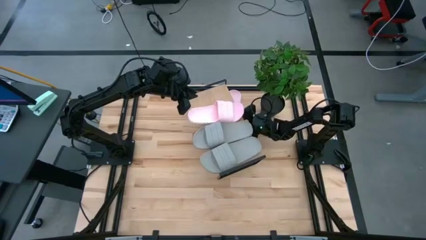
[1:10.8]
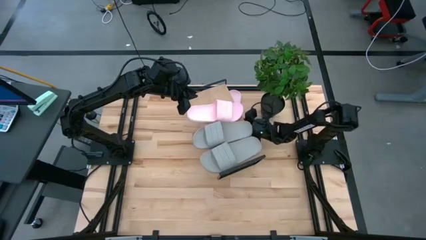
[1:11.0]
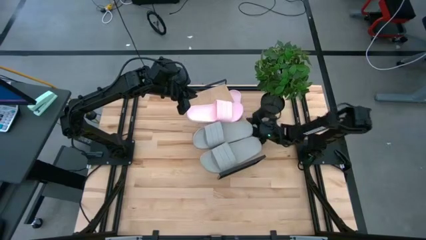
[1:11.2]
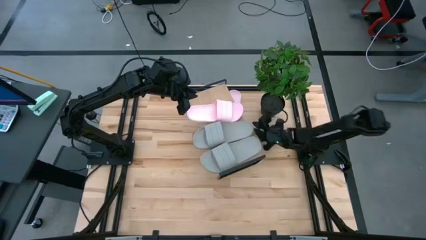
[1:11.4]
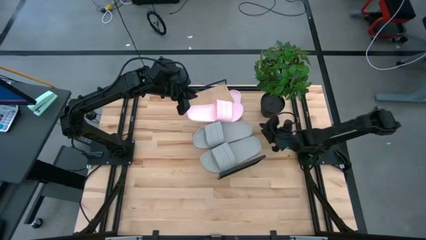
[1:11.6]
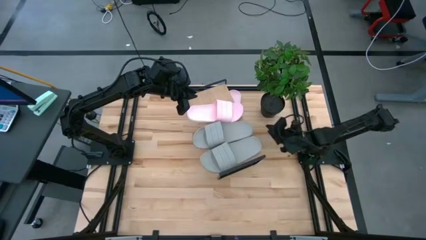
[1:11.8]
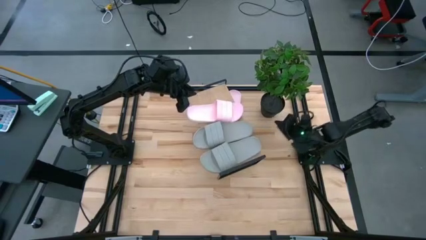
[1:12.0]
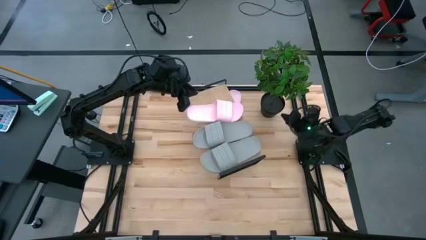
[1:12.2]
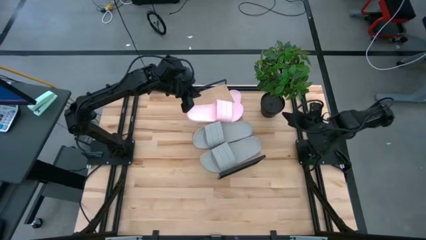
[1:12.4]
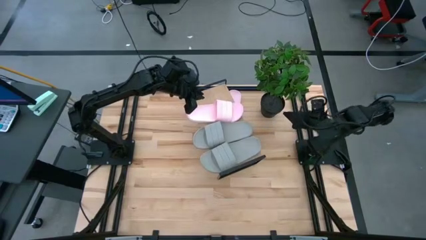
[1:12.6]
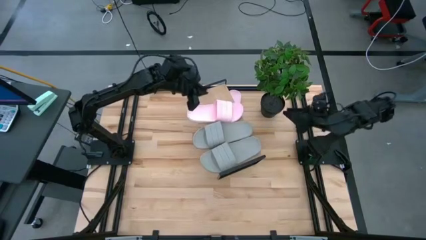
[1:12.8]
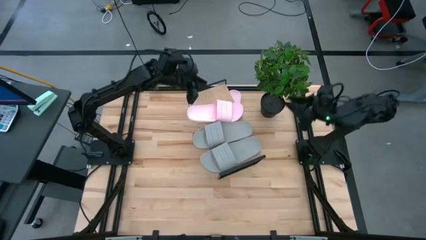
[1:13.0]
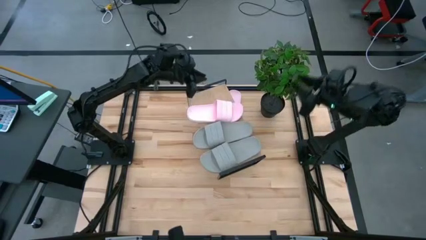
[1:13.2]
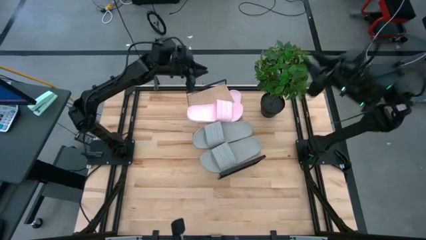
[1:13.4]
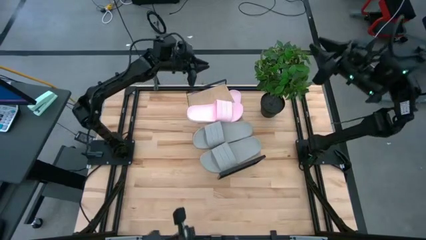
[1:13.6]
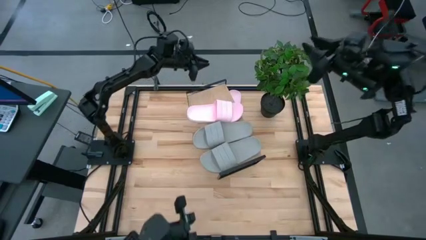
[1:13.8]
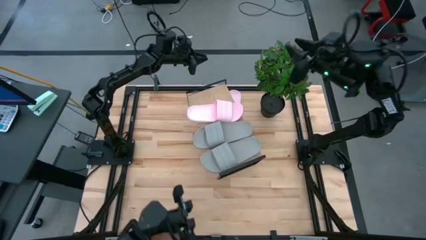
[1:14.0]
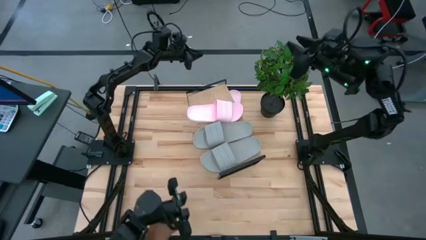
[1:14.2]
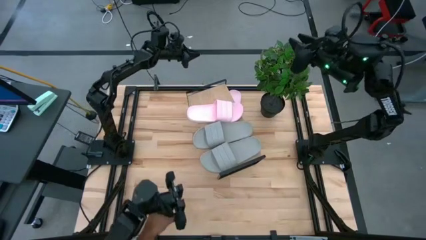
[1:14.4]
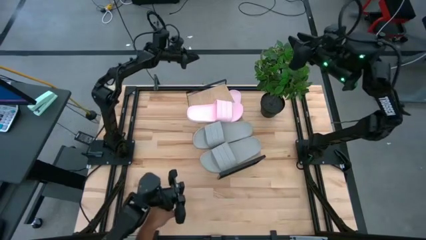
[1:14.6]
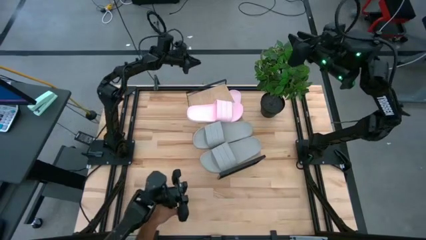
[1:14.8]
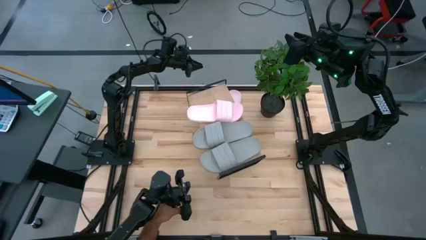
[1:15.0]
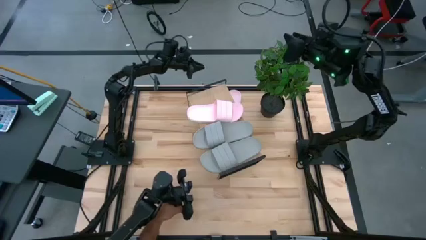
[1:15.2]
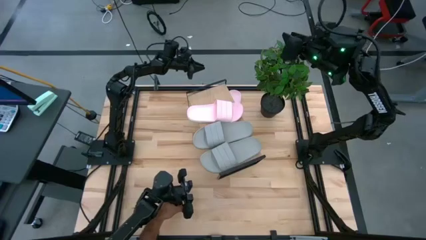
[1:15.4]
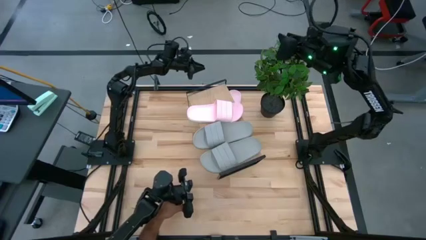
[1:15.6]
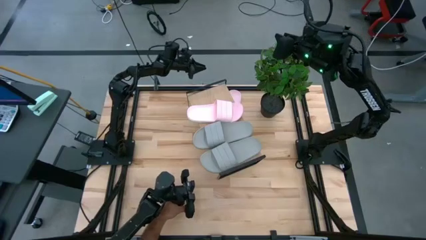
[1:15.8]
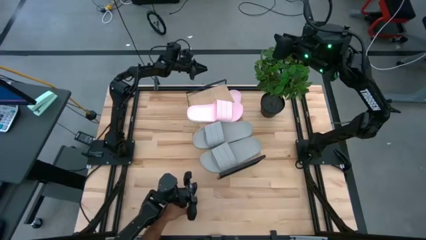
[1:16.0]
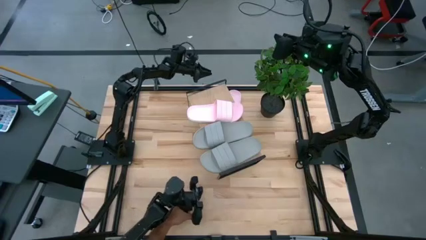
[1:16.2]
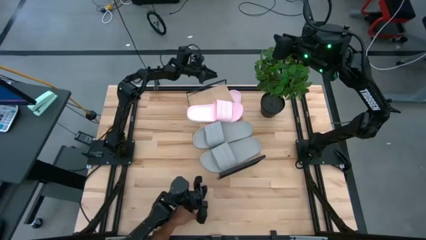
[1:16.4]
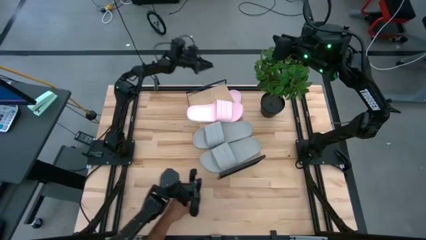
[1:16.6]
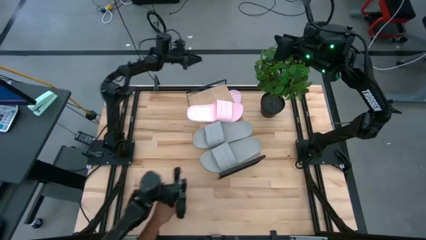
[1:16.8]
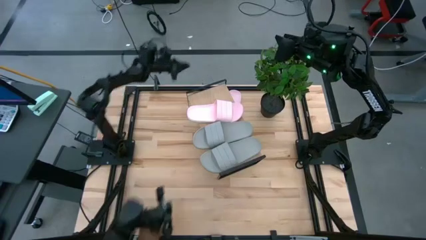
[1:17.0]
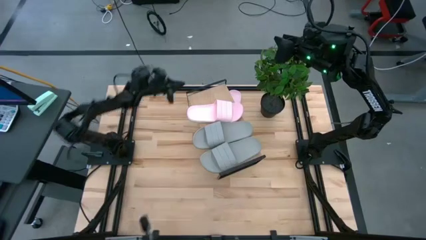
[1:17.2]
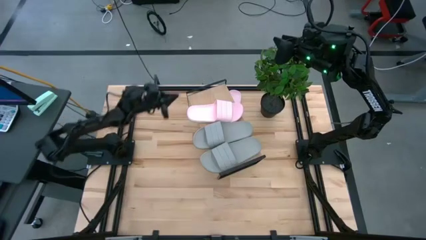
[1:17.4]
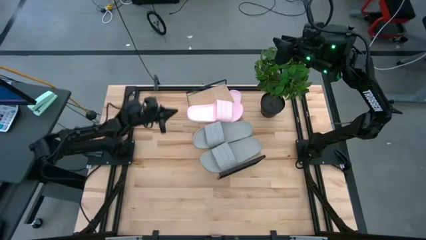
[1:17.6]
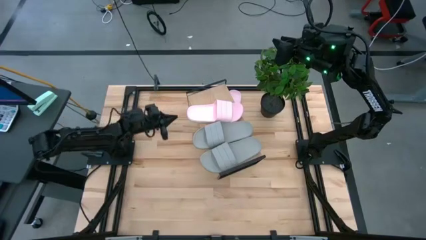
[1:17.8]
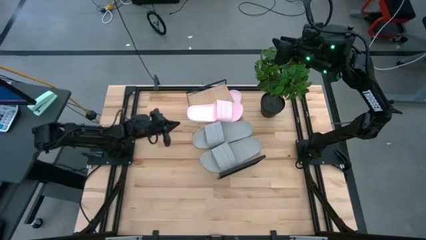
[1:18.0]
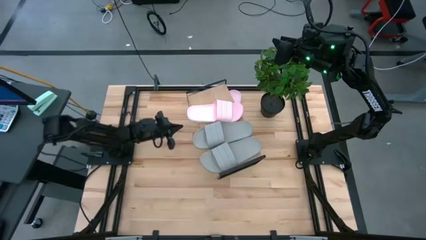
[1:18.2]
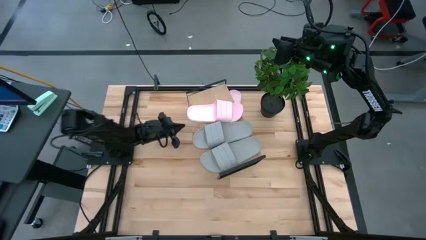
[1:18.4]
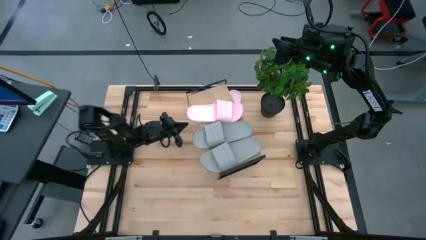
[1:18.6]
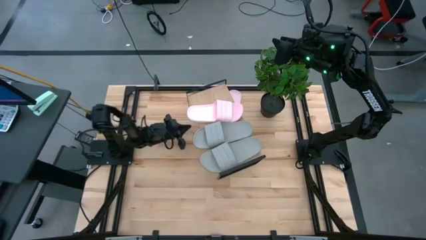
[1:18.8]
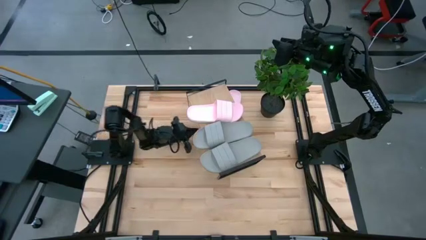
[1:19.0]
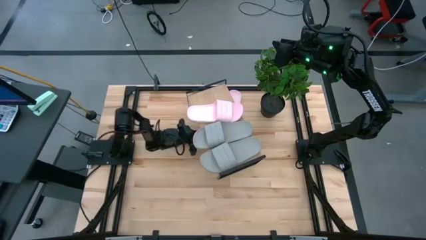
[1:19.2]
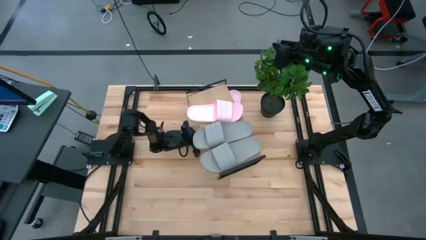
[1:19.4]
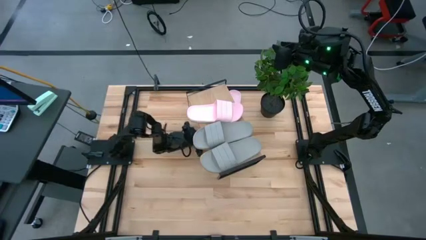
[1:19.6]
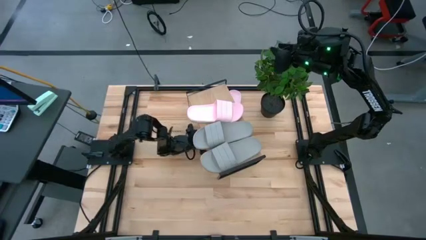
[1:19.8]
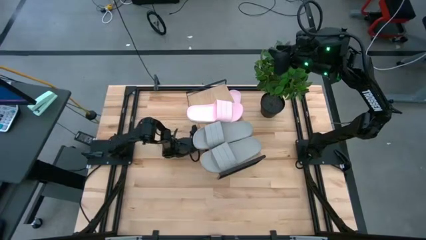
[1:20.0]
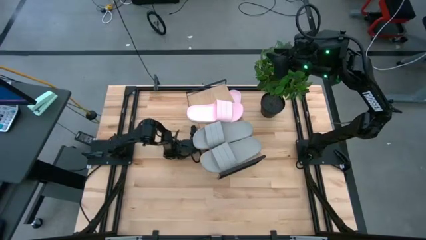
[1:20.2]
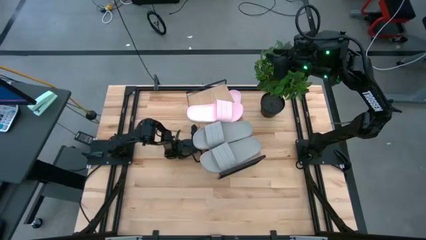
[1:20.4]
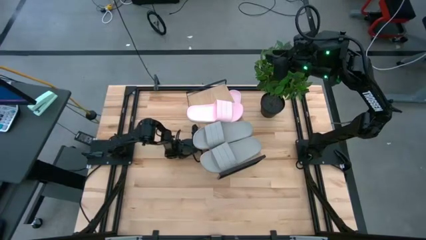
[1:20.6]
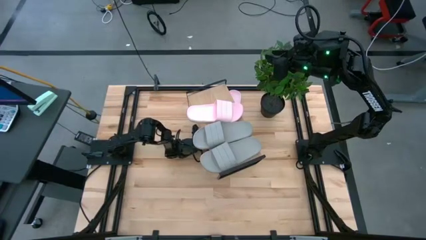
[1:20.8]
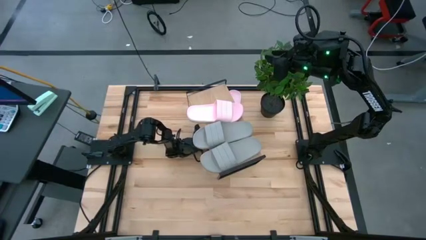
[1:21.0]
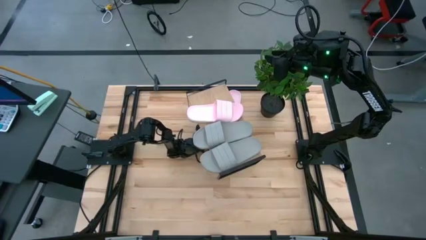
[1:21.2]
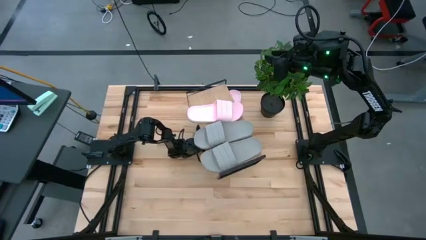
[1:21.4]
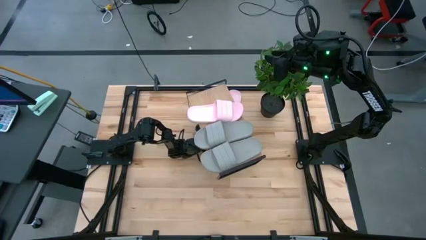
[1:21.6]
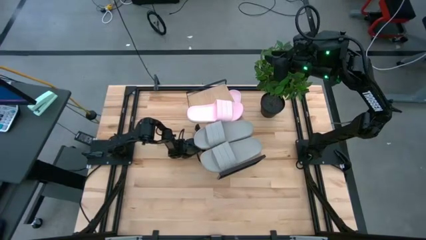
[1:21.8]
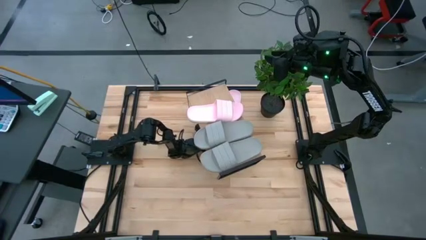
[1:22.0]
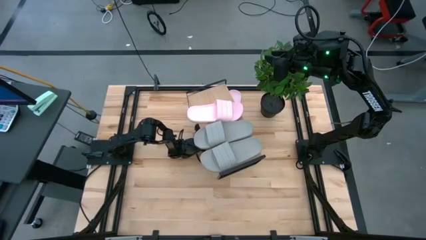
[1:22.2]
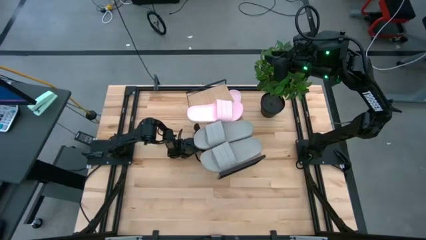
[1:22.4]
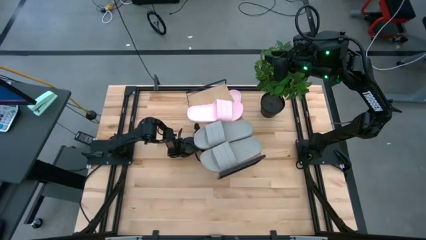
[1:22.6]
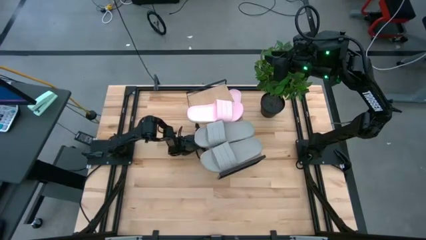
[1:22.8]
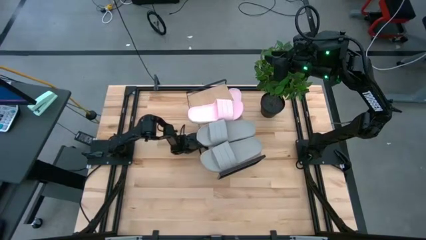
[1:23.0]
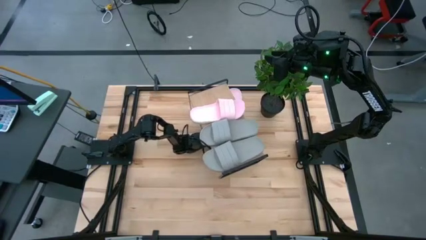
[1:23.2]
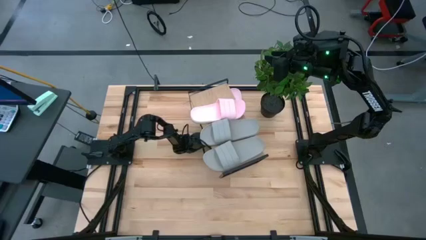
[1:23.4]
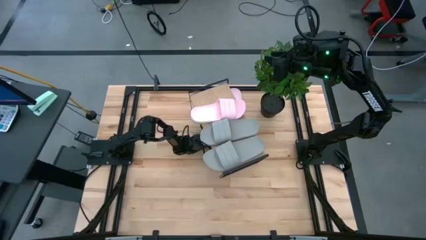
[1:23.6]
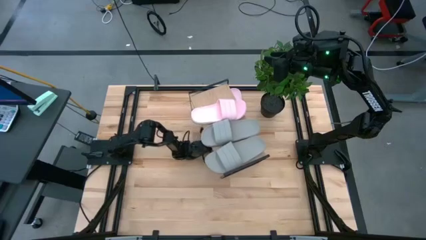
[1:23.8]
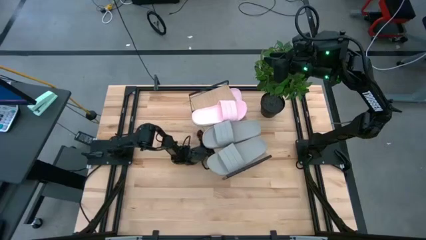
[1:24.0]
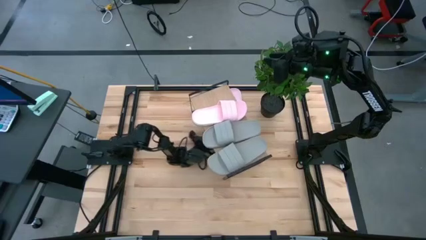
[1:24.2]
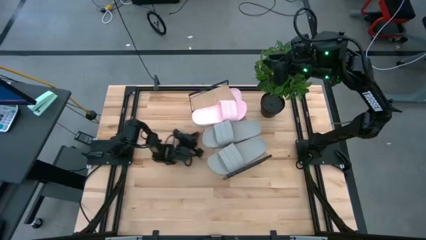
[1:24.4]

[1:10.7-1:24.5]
Task: Pick and place slides into the shelf
Put the pink slipper on the shelf

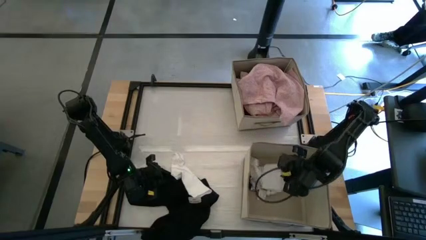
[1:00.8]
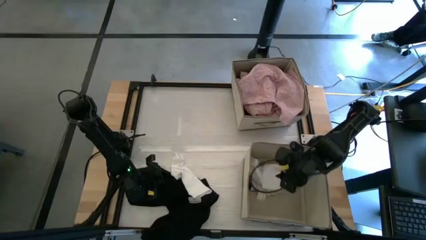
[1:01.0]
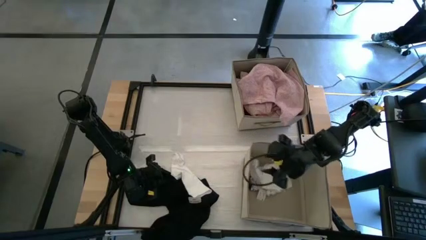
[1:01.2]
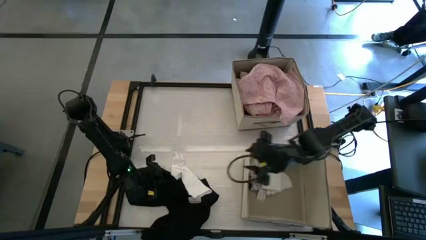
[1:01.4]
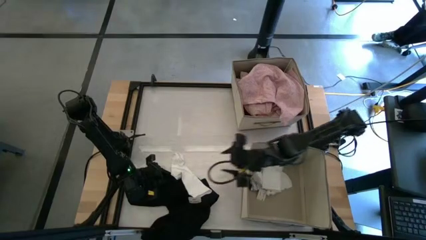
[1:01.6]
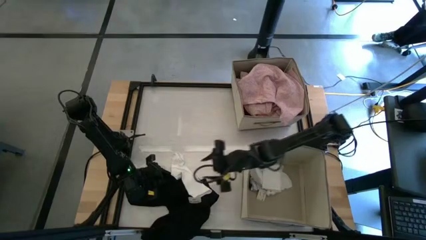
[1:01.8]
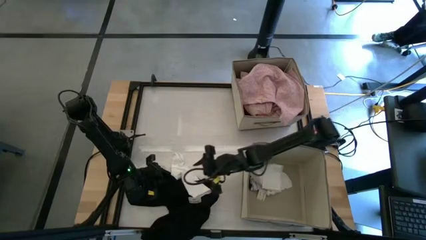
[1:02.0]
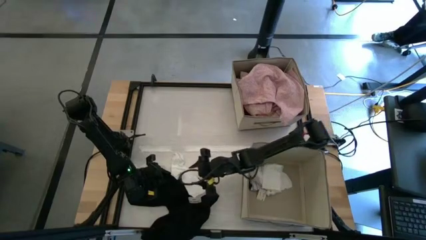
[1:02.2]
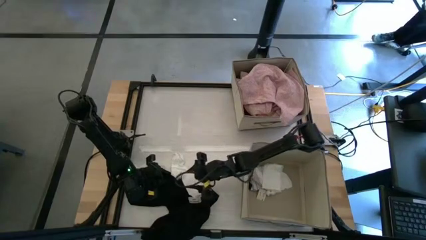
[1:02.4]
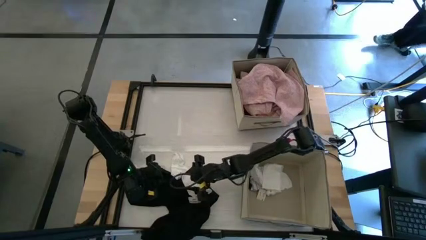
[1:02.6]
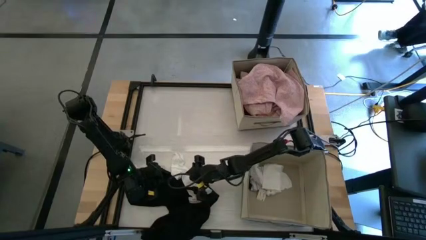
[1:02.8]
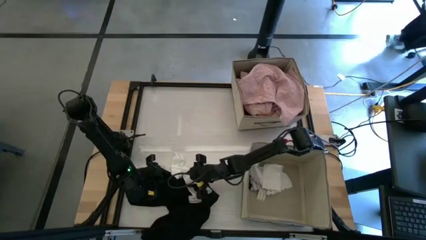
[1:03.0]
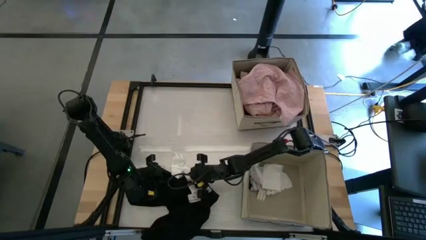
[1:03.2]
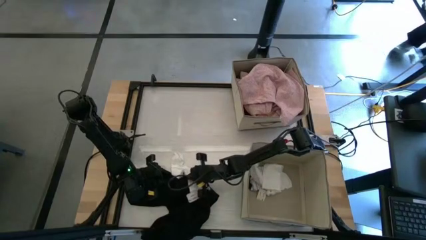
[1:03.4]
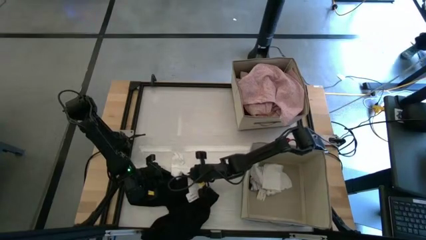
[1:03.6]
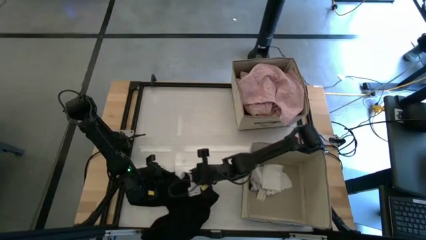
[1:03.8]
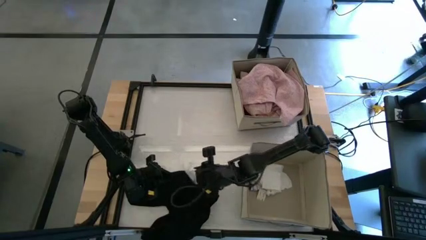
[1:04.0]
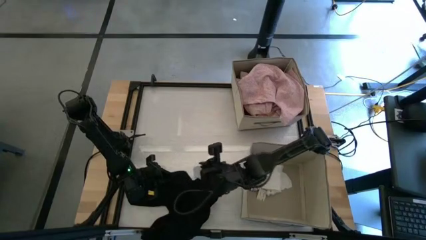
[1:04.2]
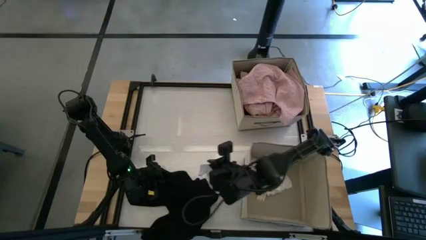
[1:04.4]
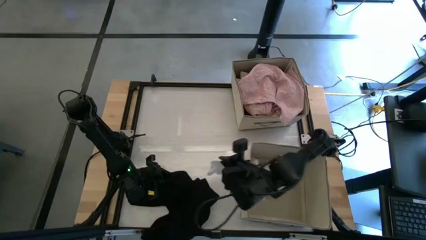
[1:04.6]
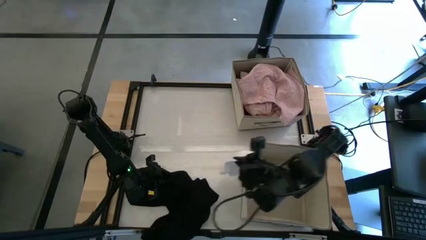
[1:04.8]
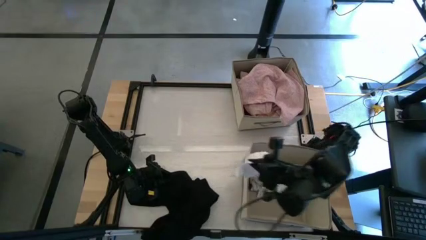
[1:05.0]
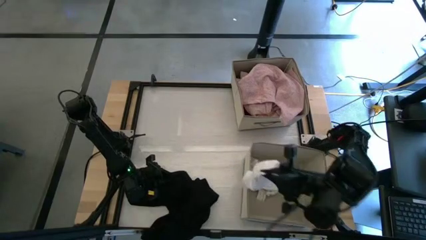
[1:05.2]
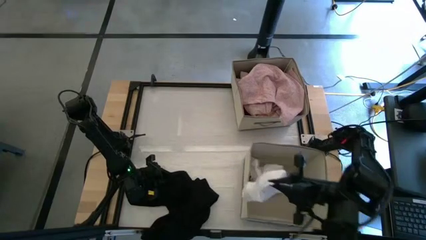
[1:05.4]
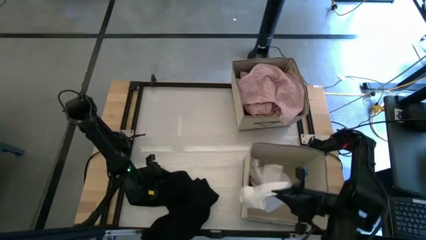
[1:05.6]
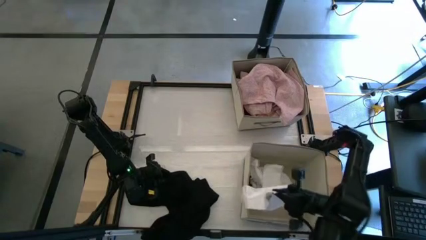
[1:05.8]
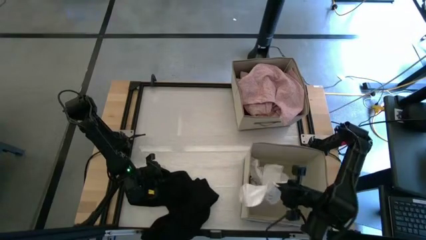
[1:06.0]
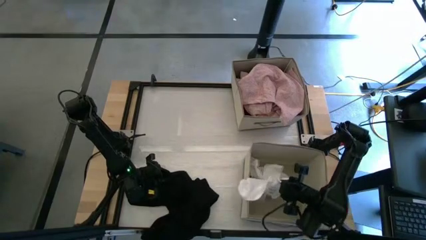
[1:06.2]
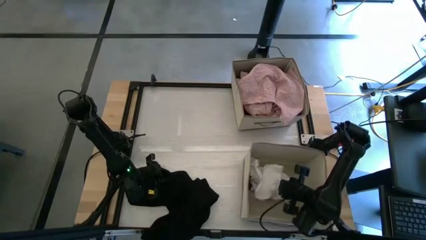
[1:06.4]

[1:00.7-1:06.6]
Task: Sort clothes
Put the white sock into the bottom laundry organizer
